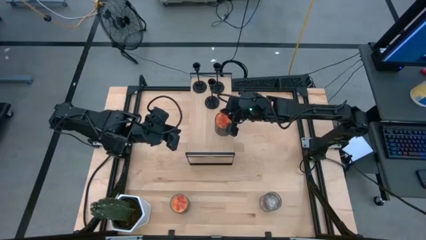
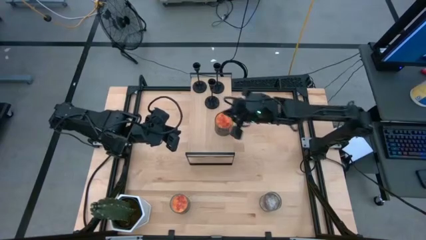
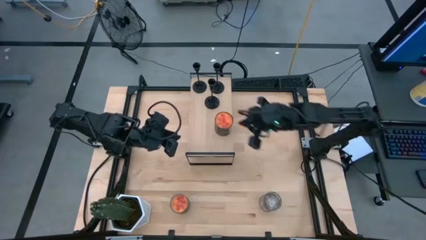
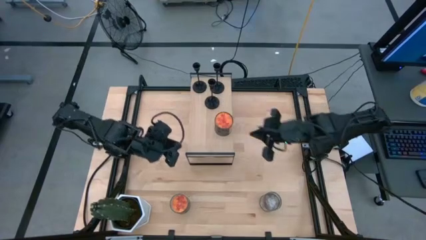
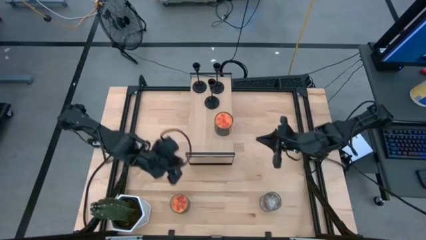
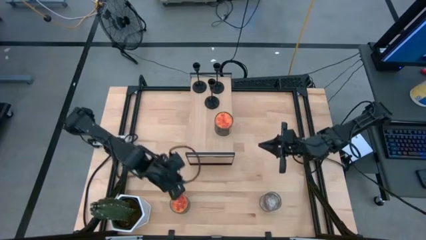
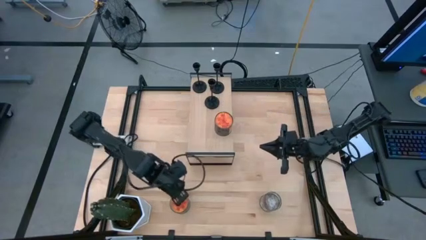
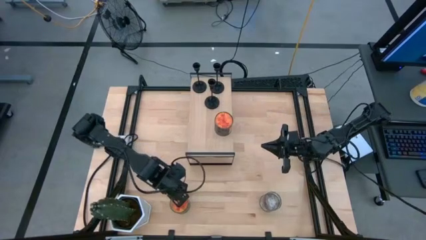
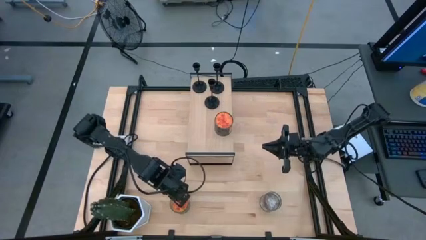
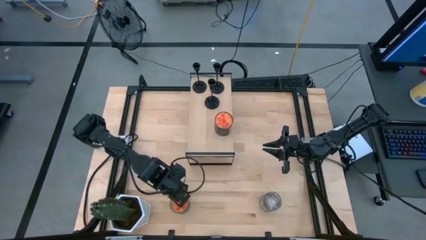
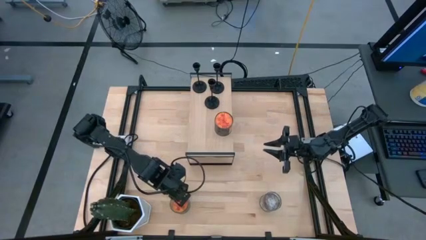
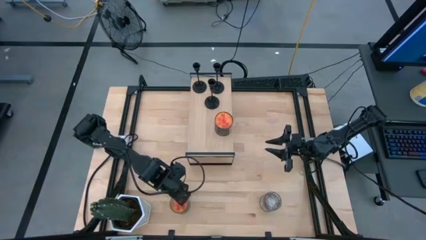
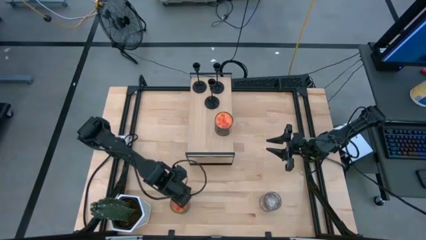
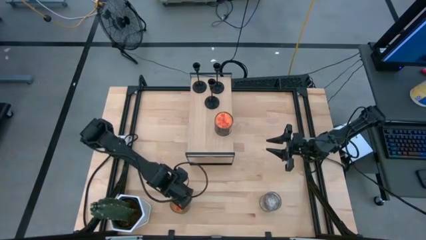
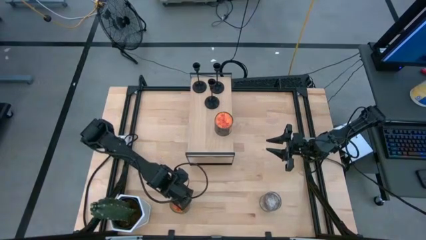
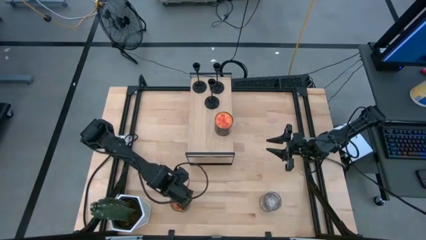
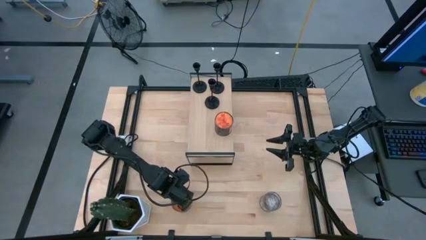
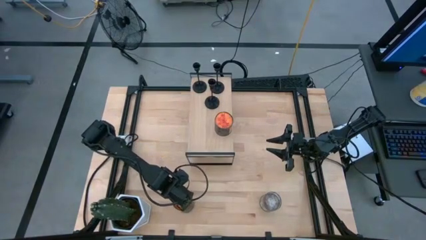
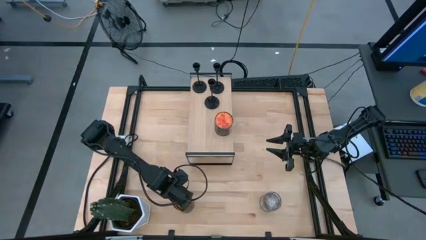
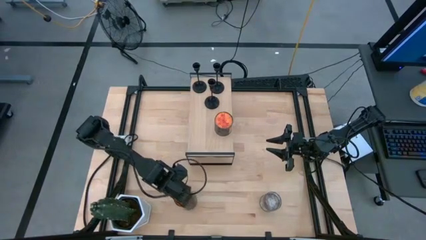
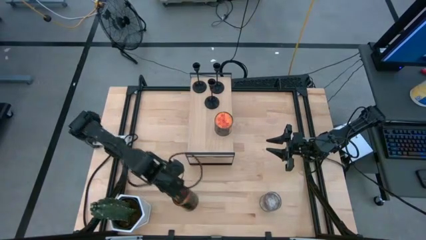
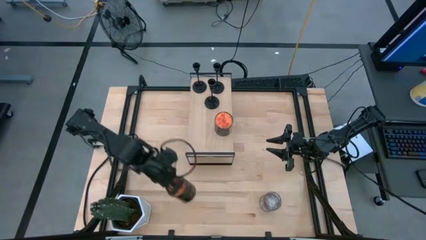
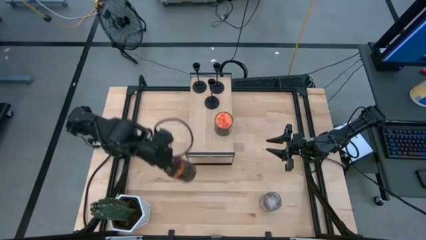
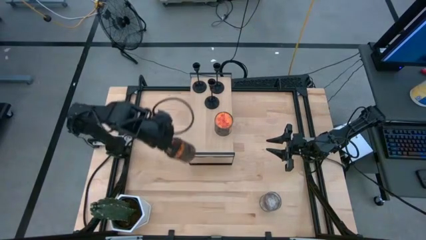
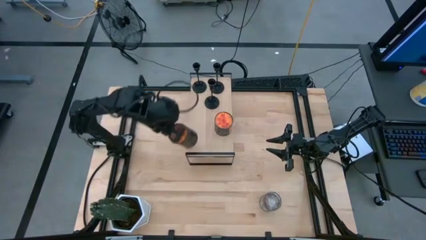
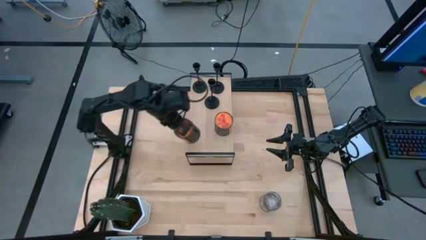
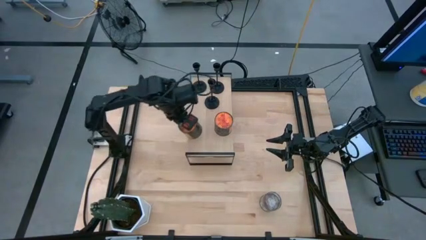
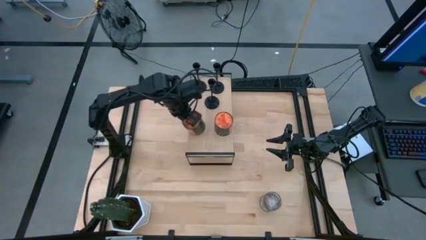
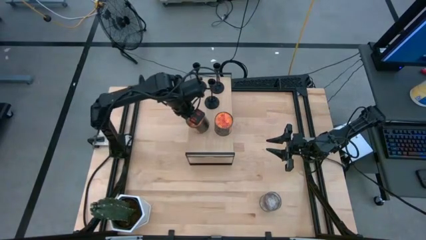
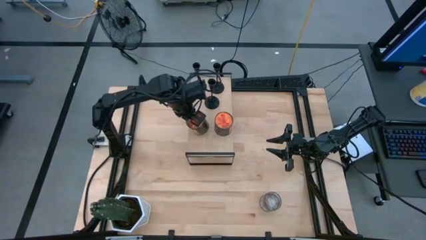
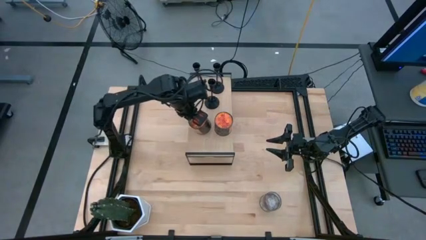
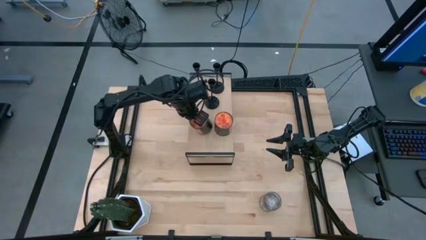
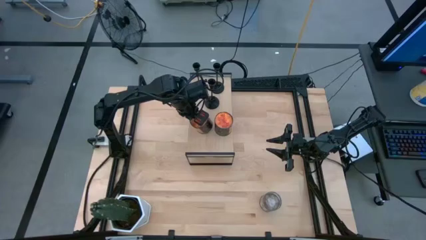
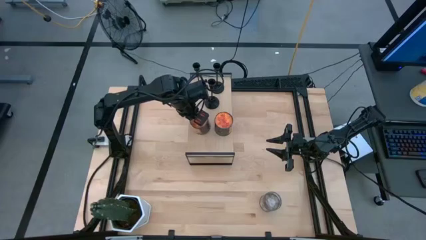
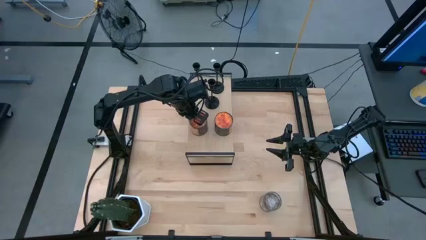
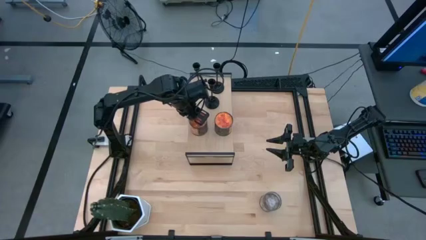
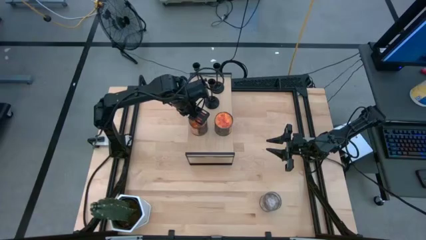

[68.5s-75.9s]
Task: Pick & Place candle stick holders
Put the orange scented candle on the shelf

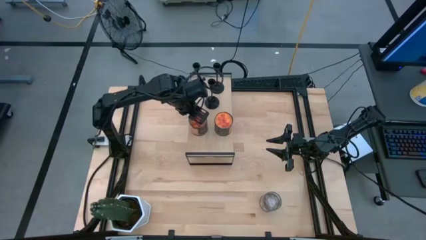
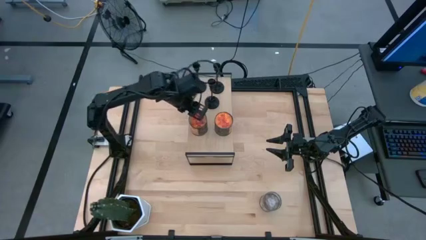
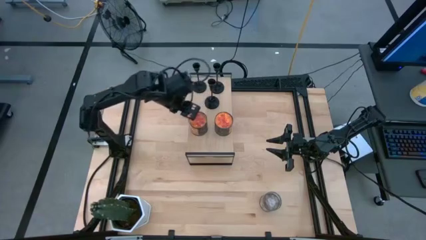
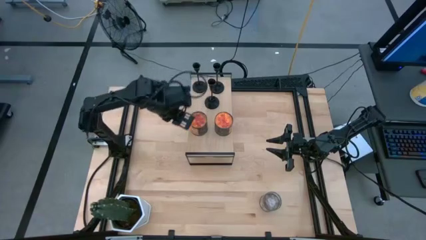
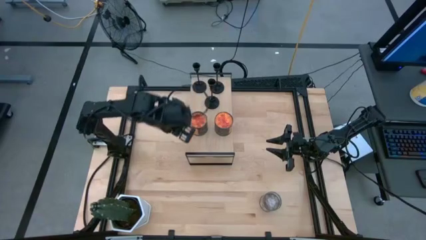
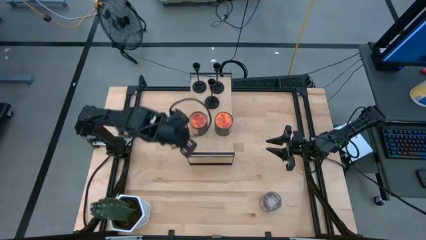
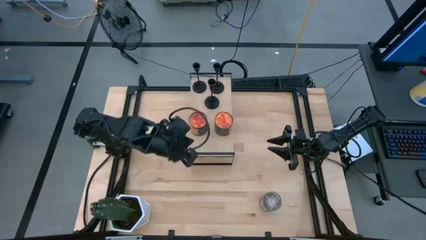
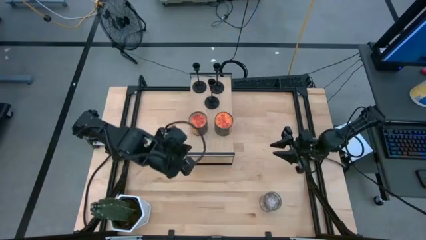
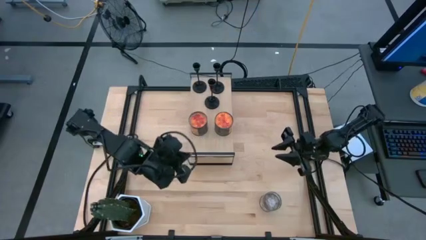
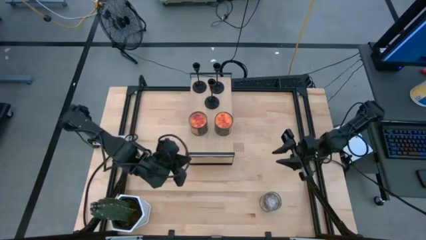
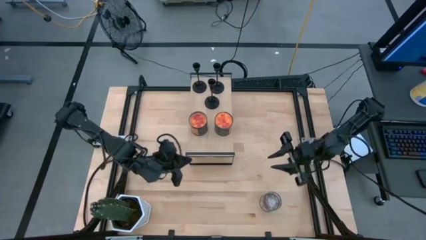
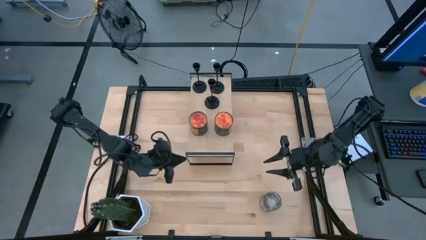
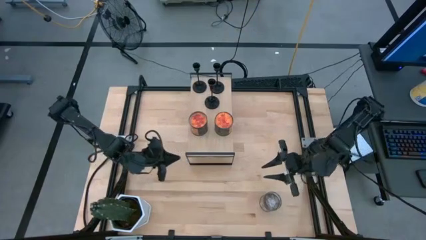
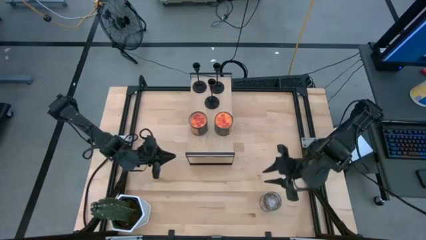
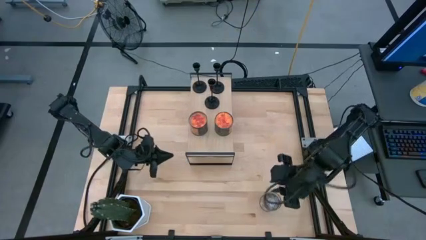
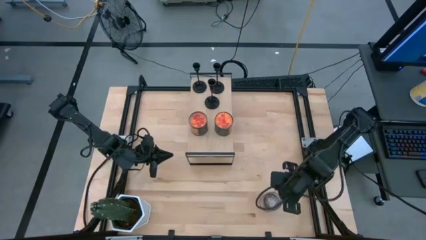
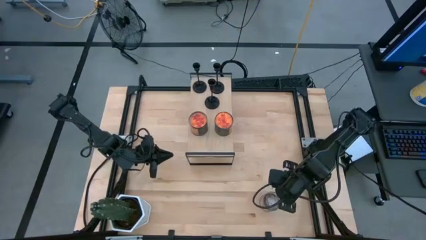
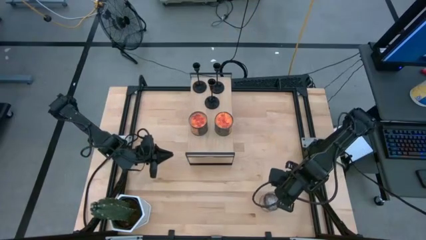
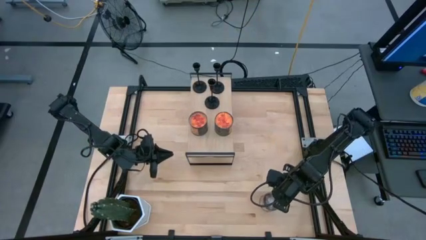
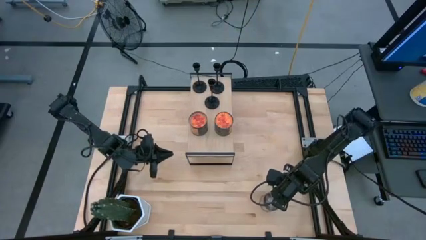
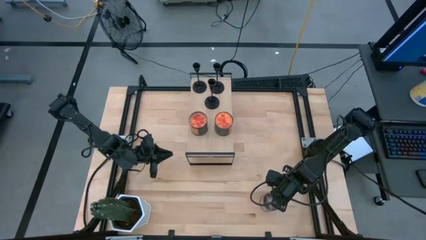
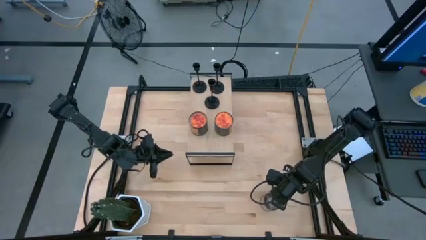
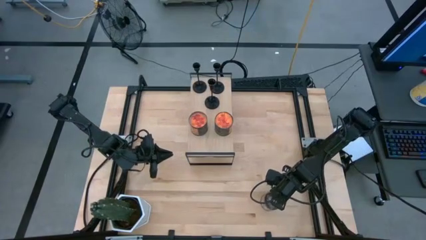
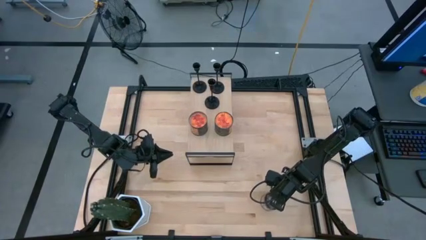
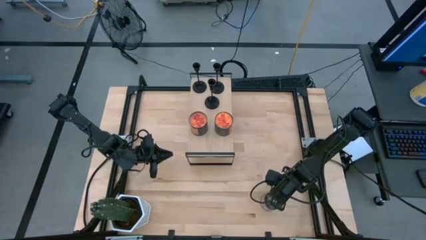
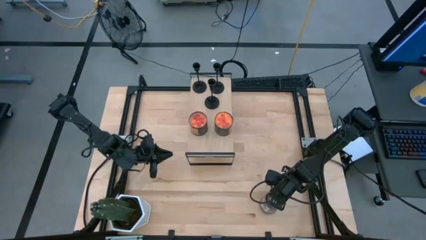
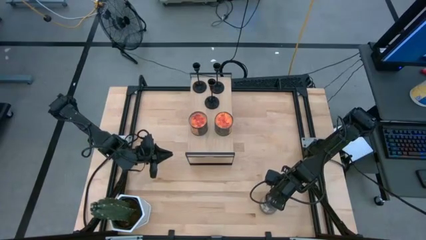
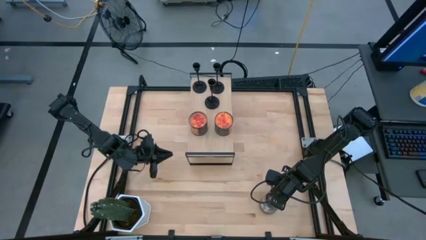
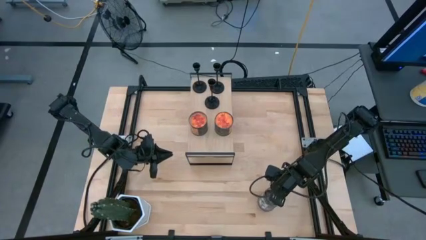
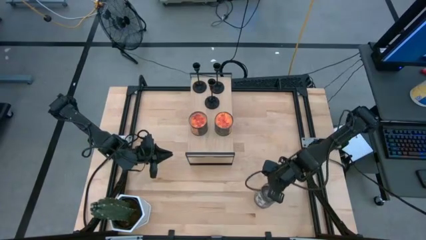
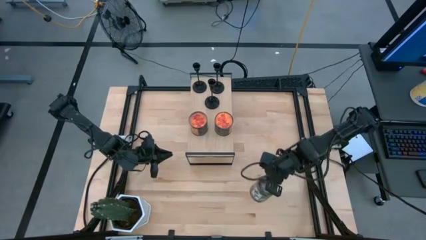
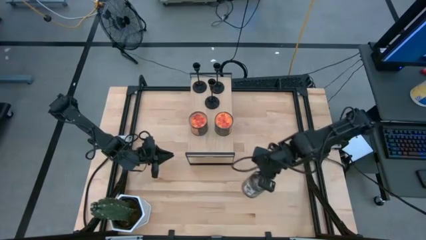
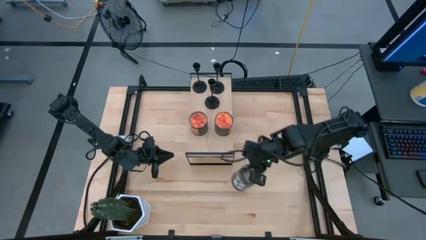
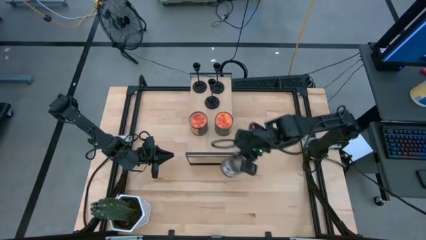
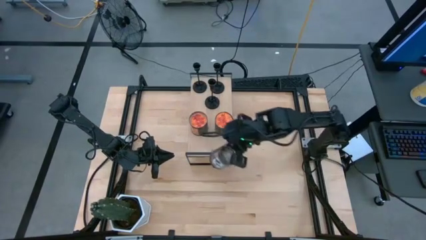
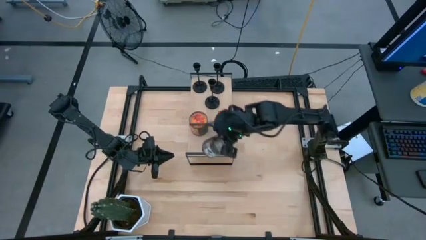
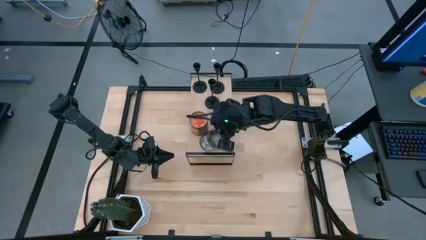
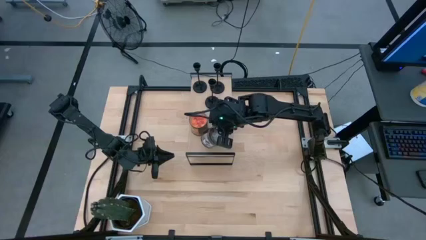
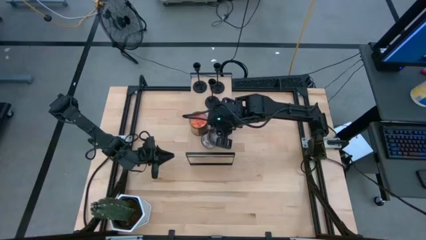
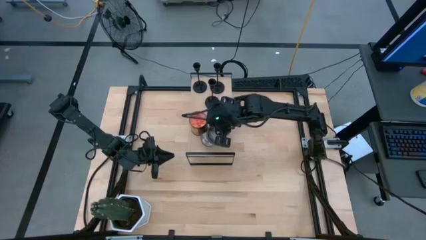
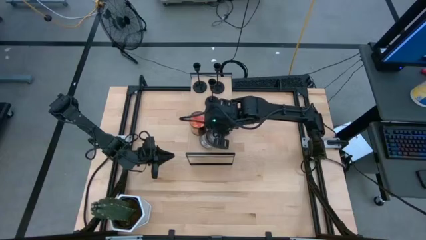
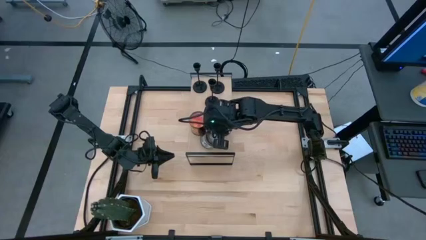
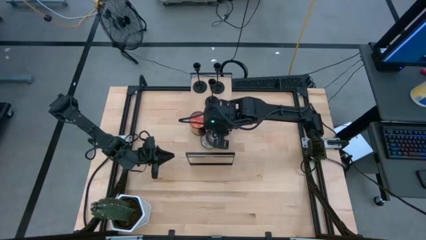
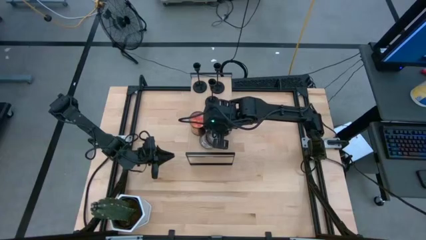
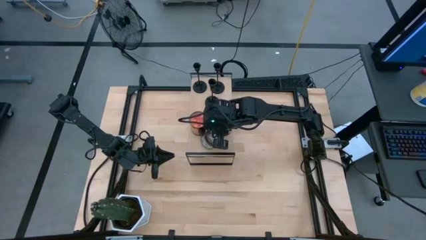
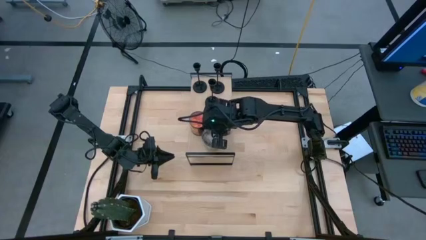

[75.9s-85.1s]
Put the brown scented candle on the shelf
